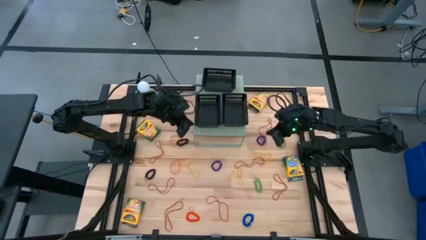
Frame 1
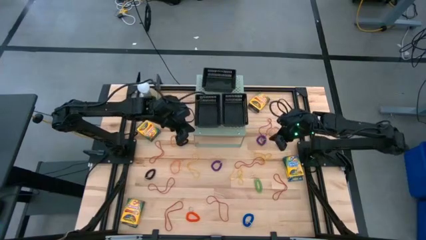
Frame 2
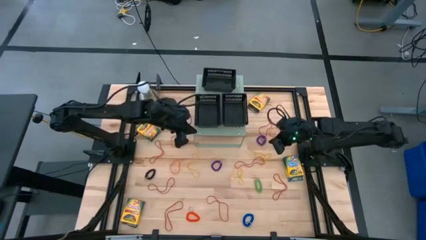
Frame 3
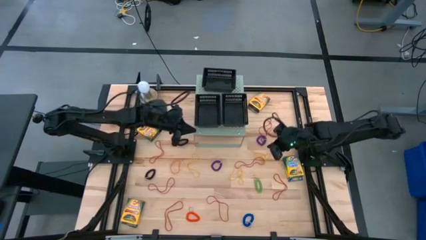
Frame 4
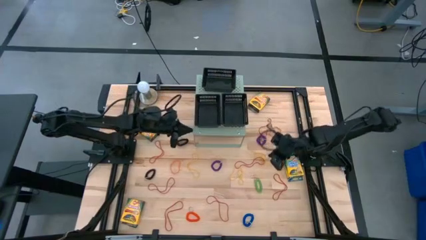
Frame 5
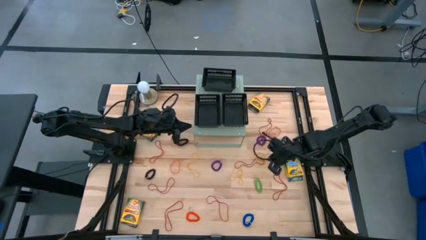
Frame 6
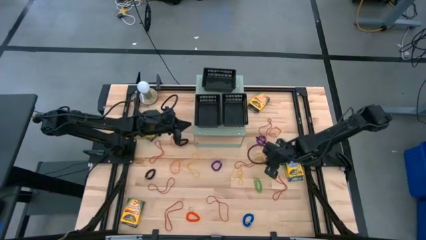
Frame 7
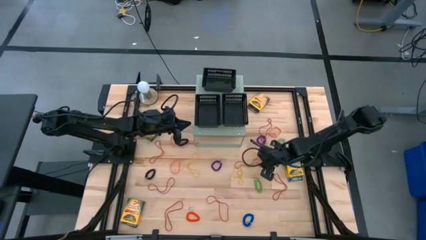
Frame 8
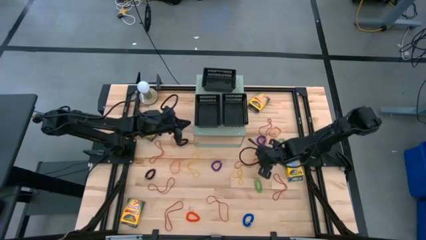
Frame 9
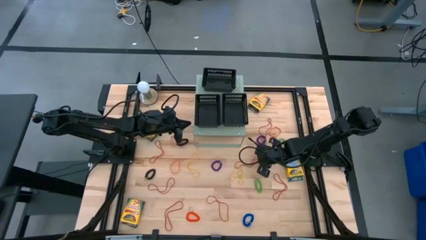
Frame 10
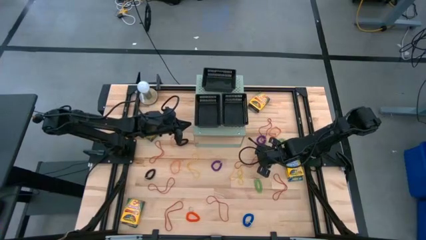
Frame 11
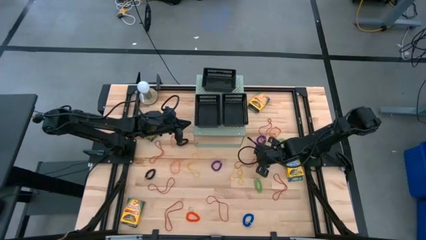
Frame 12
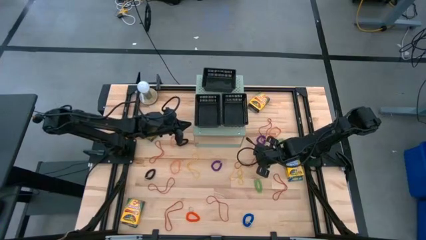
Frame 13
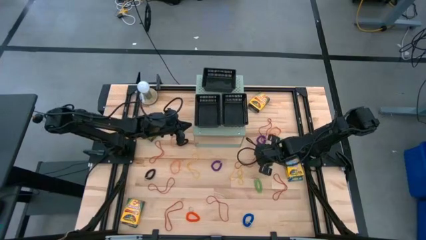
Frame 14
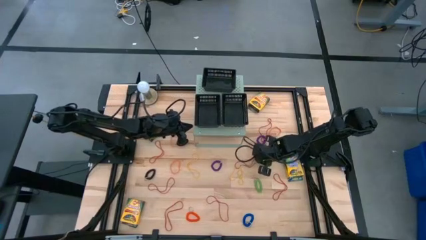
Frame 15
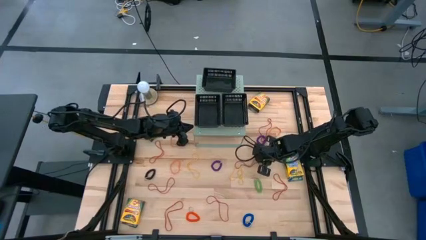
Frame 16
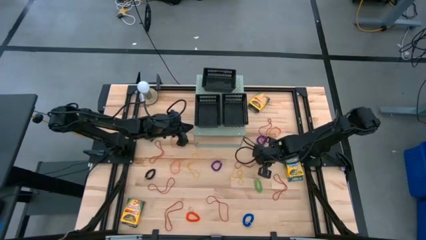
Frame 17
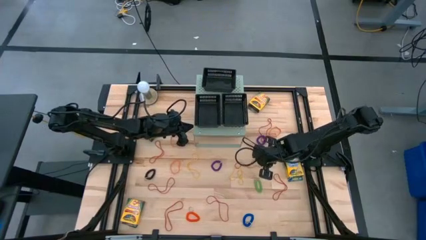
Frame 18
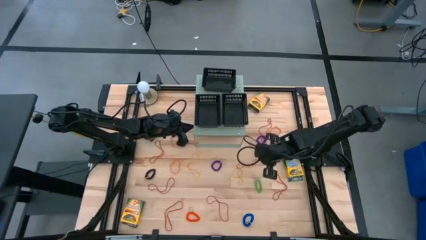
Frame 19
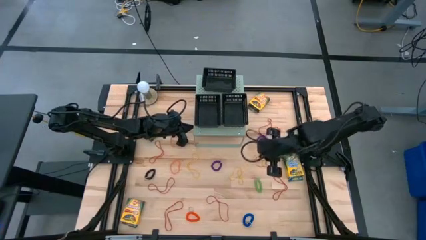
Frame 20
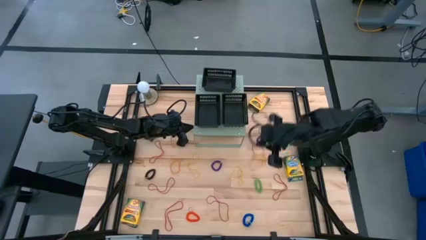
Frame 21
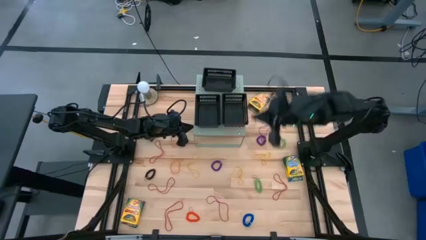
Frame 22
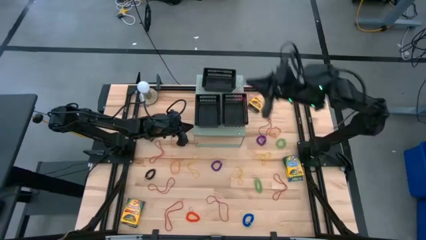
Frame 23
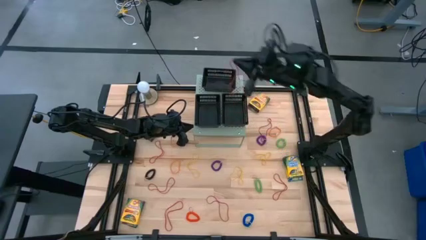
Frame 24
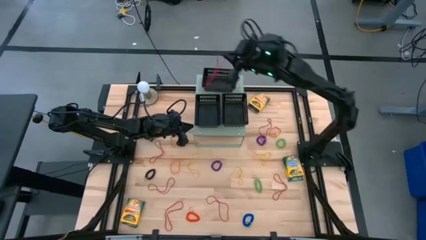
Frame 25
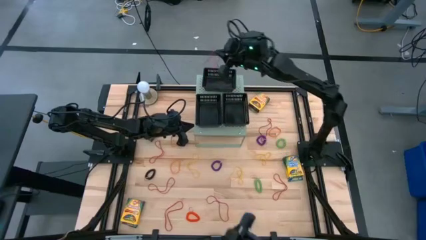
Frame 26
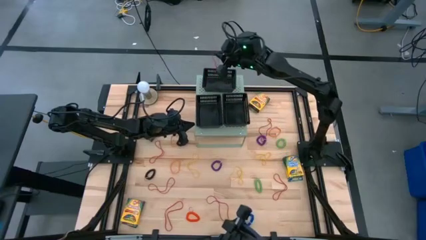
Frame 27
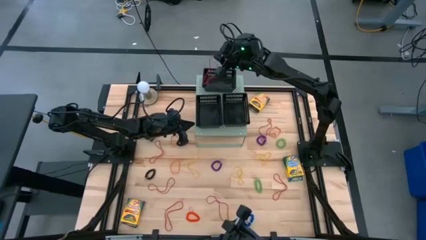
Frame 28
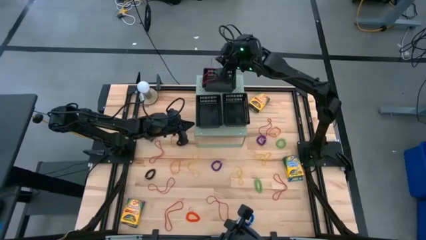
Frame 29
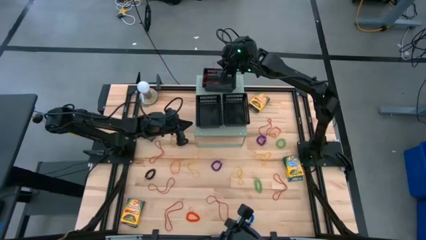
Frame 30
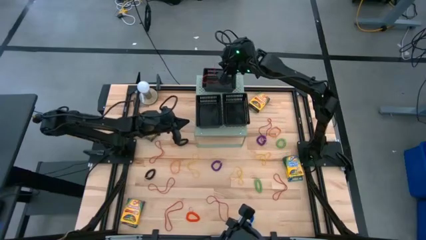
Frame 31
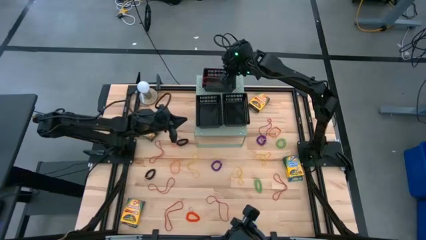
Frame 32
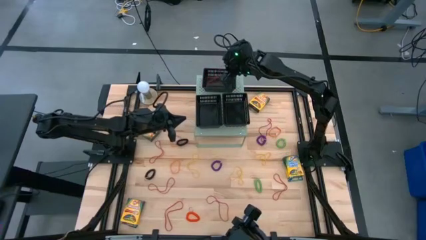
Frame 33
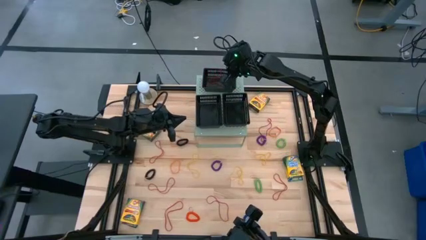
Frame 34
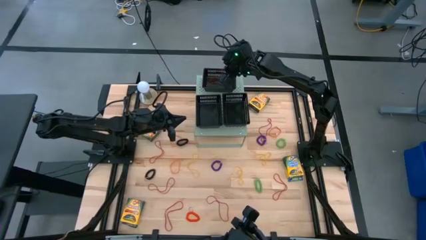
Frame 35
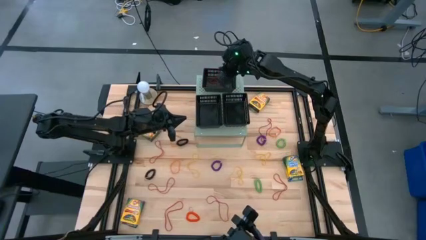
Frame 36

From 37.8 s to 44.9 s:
Task: Pick & Place Office Desk Supplies
Put the red rubber band into the top black bin

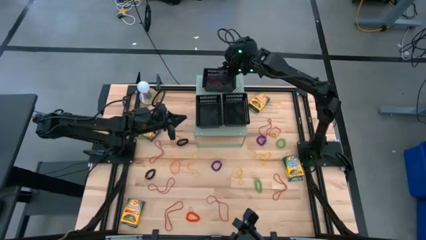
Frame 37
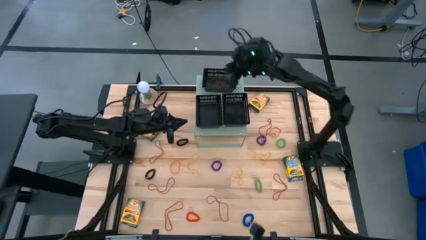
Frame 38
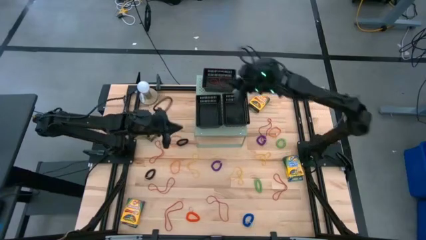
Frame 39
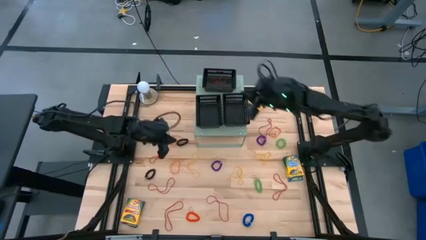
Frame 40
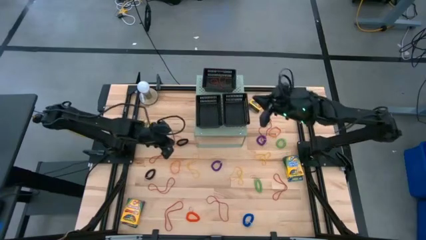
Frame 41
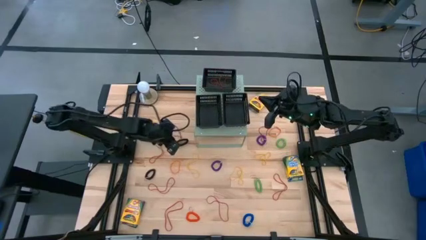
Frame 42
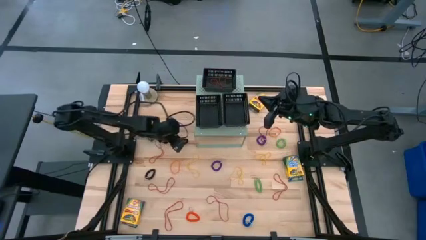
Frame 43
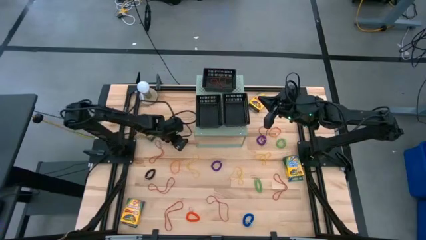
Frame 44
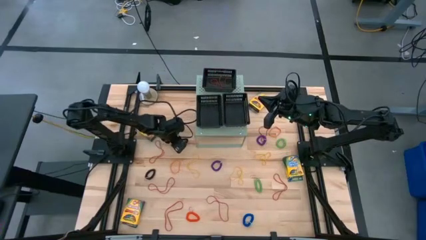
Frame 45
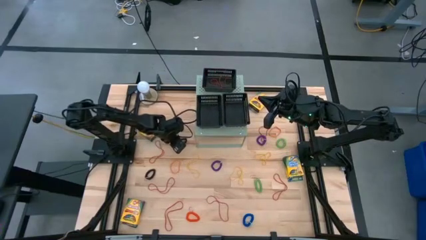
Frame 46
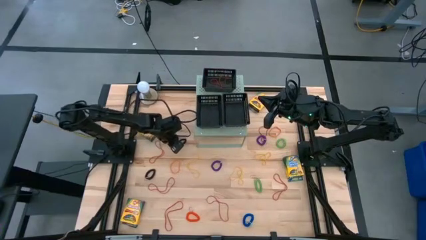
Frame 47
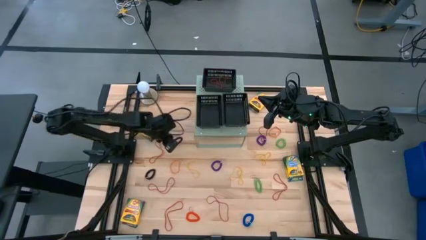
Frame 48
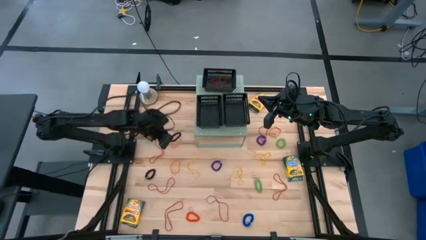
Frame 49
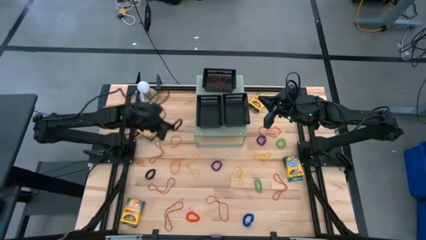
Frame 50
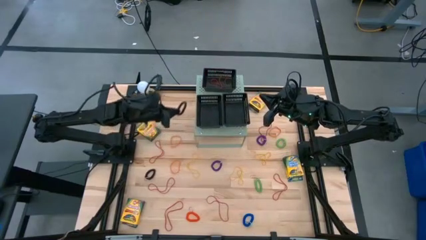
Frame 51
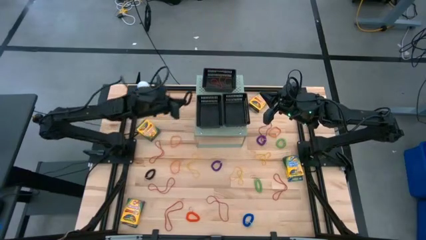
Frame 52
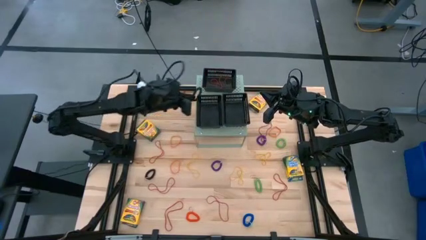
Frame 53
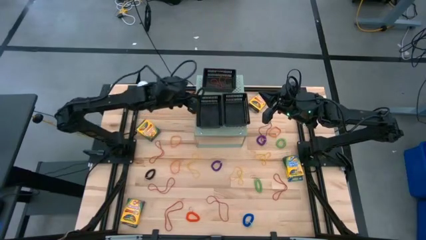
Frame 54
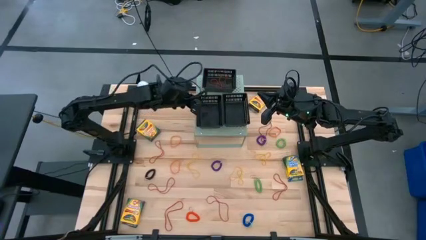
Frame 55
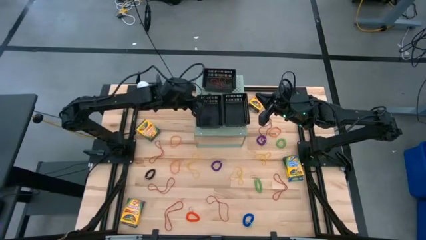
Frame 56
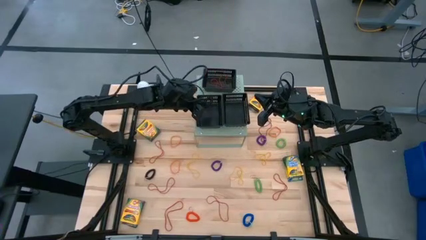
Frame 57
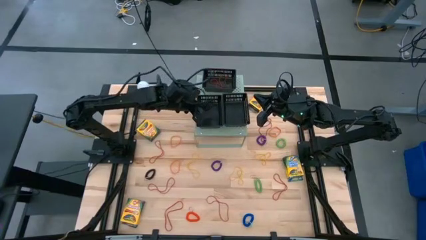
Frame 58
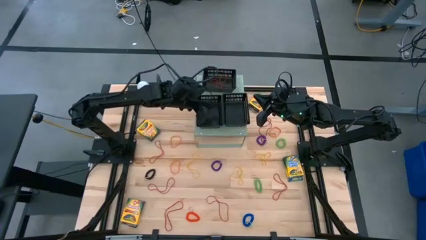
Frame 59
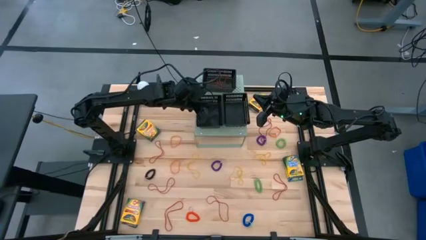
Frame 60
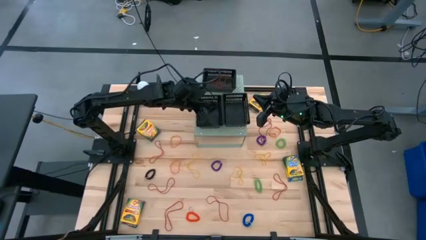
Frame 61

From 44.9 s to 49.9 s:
Put the black spiral keychain into the bottom left black bin

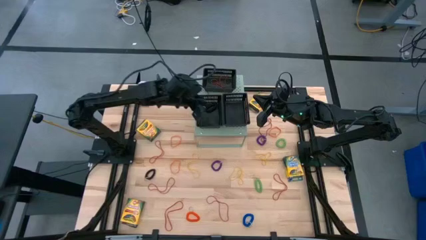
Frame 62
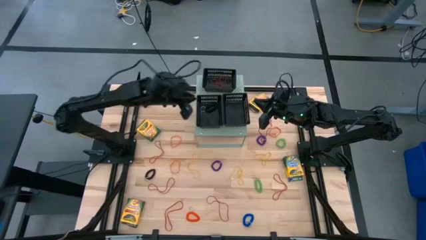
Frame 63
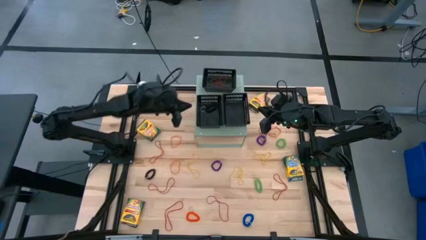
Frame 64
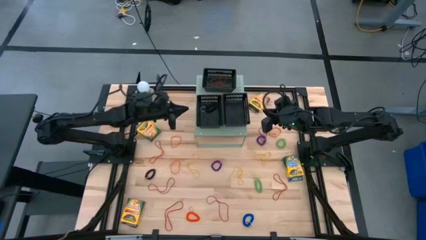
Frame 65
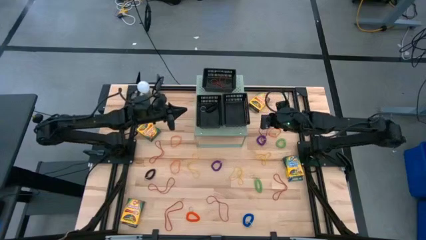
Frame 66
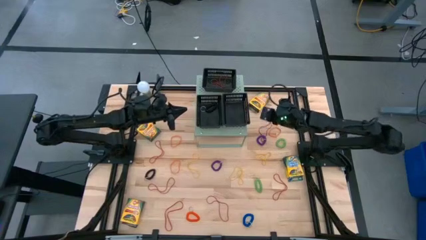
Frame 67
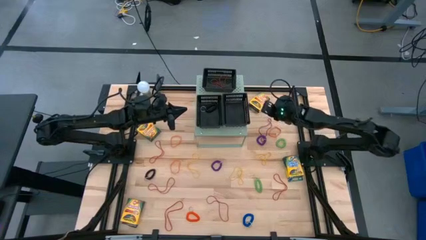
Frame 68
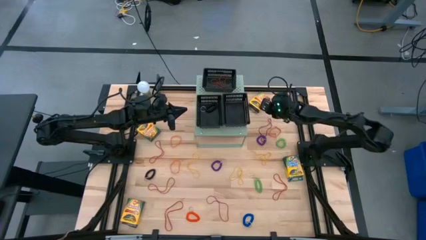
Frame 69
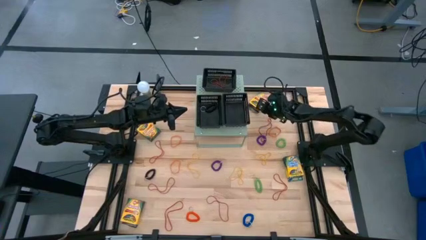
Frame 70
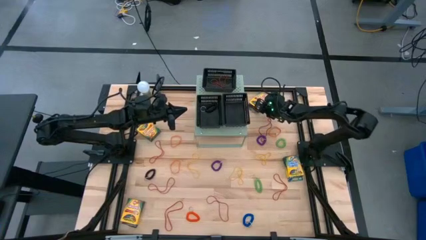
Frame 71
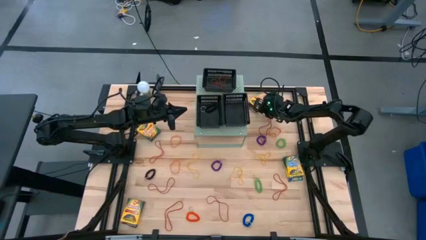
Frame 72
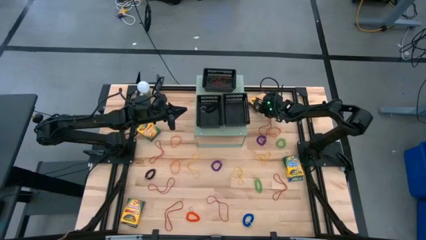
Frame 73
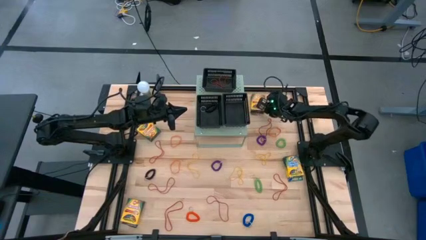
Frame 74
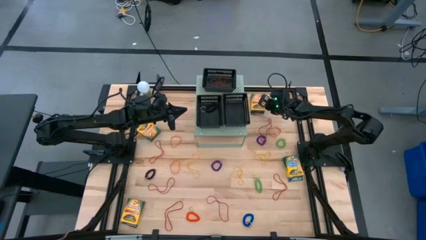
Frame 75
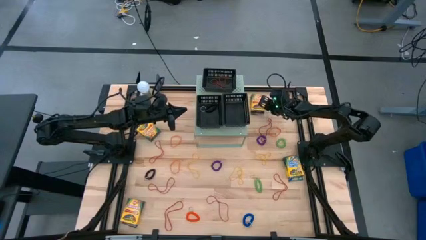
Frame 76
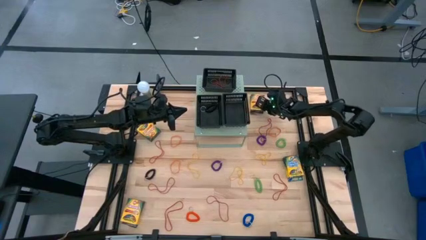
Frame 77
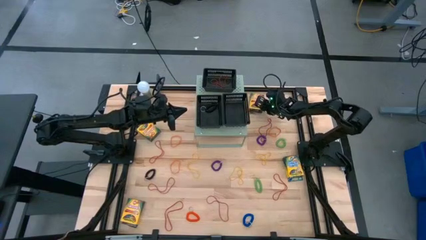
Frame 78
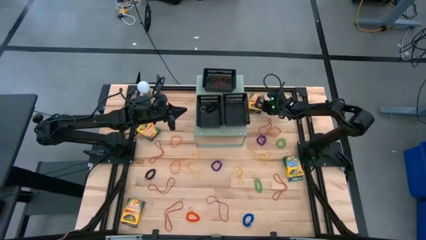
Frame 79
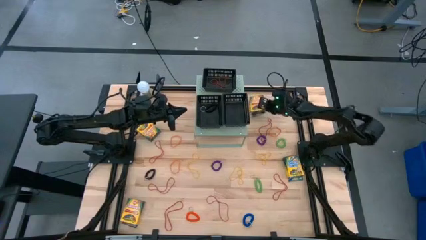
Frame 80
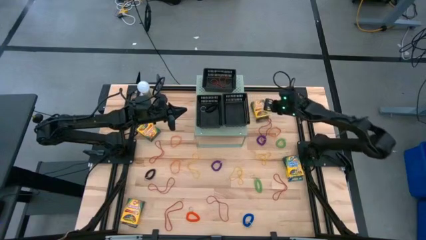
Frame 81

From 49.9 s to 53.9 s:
Put the yellow crayon box into the bottom right black bin
